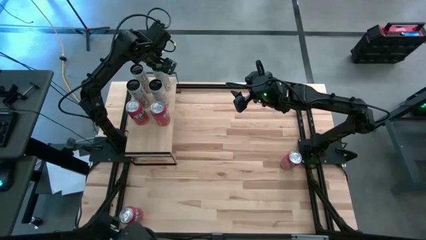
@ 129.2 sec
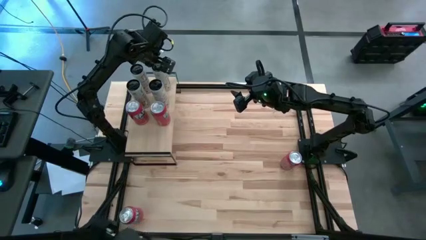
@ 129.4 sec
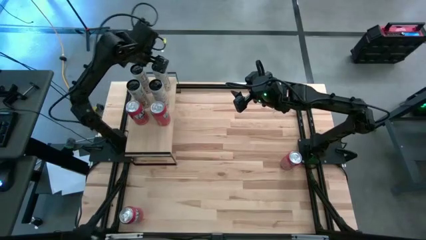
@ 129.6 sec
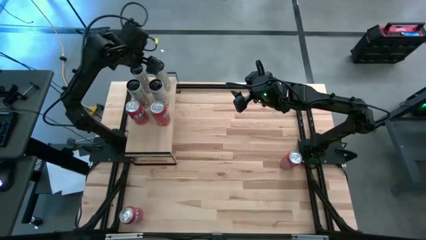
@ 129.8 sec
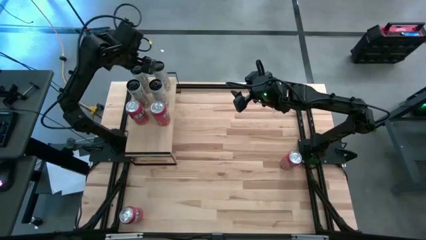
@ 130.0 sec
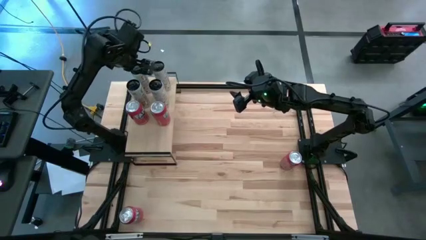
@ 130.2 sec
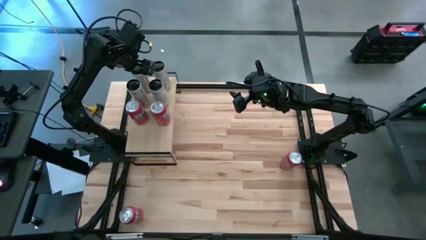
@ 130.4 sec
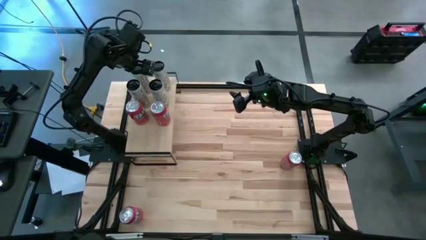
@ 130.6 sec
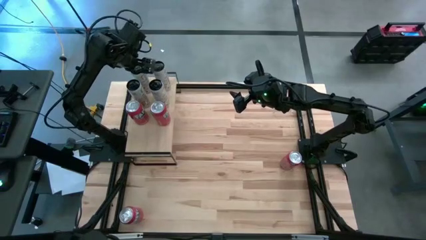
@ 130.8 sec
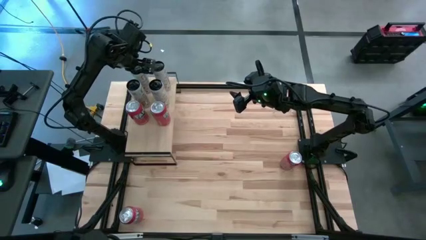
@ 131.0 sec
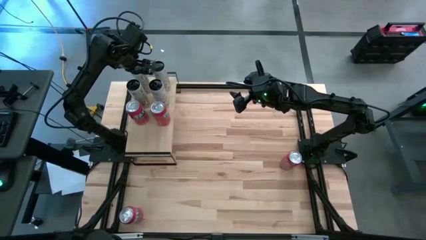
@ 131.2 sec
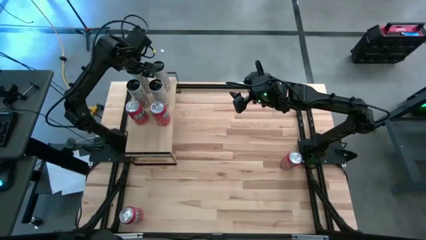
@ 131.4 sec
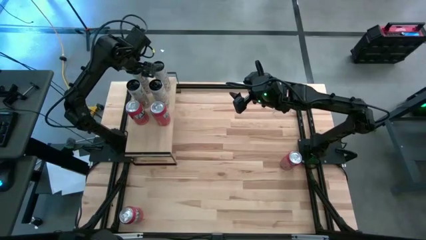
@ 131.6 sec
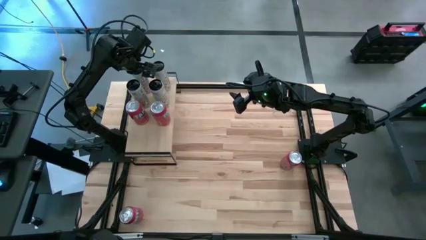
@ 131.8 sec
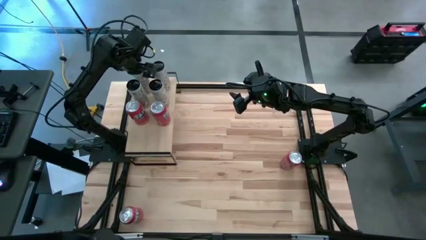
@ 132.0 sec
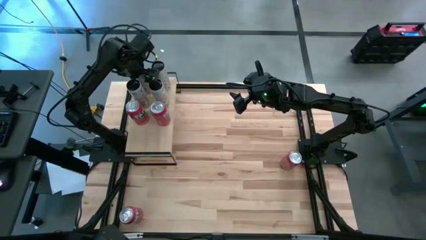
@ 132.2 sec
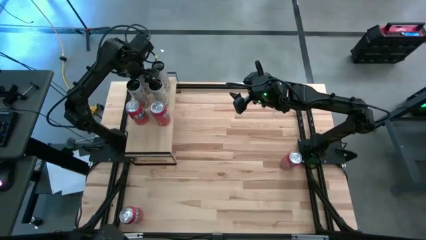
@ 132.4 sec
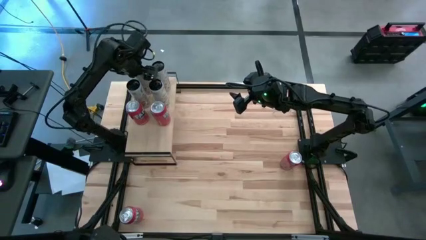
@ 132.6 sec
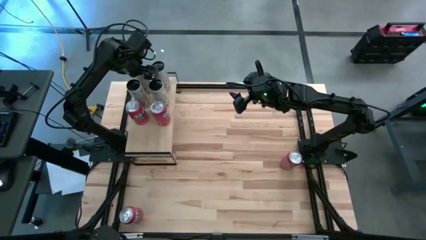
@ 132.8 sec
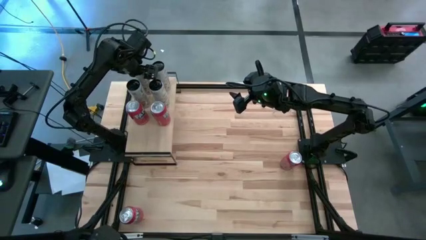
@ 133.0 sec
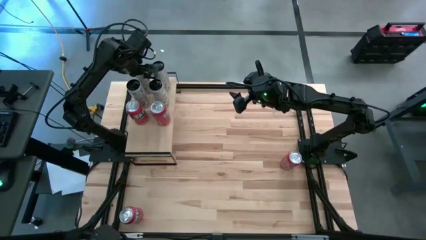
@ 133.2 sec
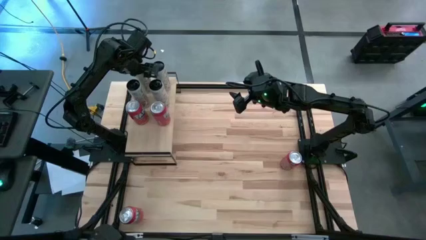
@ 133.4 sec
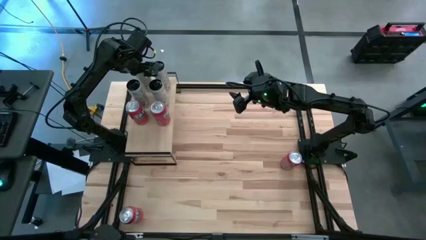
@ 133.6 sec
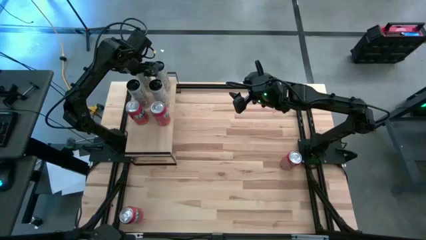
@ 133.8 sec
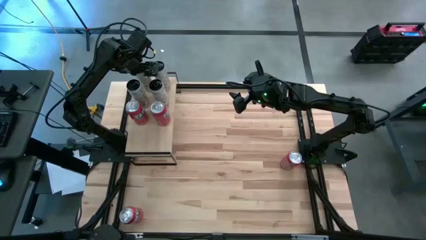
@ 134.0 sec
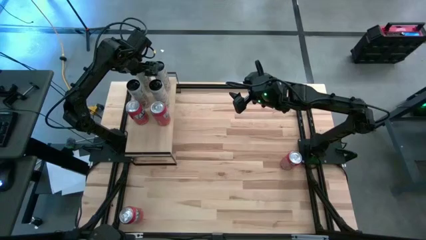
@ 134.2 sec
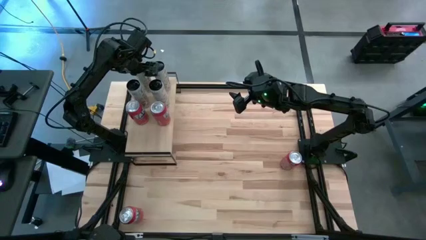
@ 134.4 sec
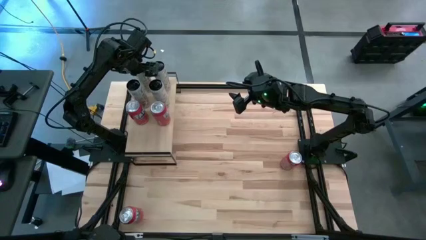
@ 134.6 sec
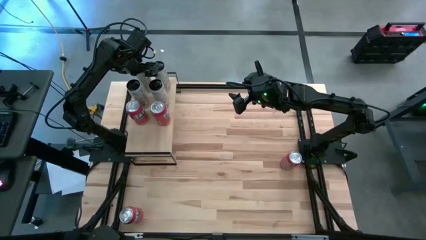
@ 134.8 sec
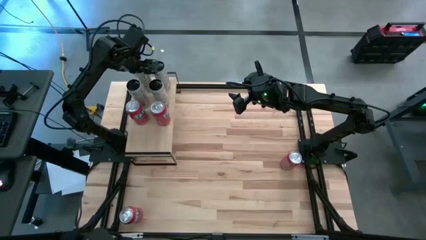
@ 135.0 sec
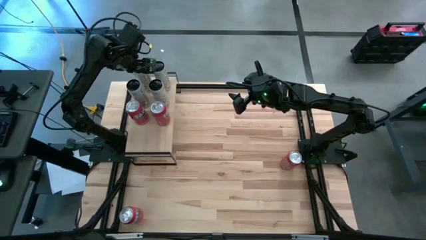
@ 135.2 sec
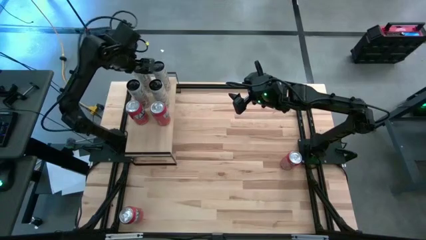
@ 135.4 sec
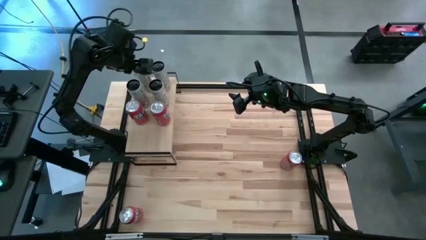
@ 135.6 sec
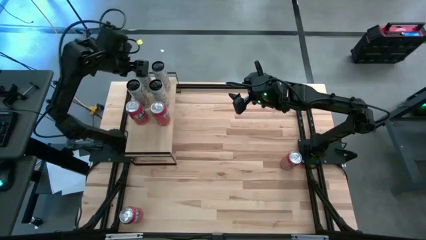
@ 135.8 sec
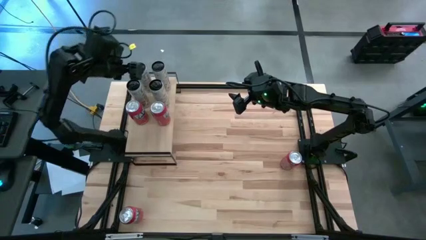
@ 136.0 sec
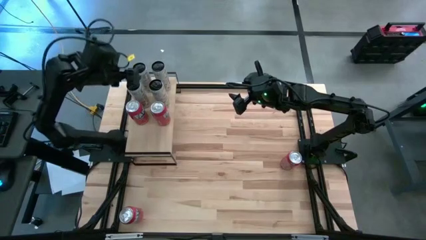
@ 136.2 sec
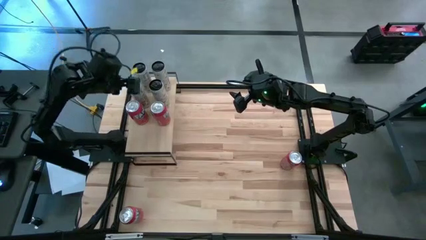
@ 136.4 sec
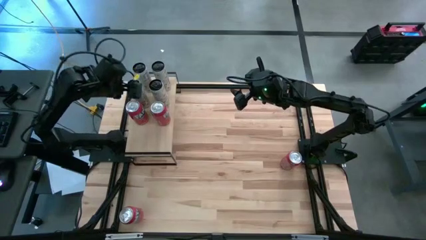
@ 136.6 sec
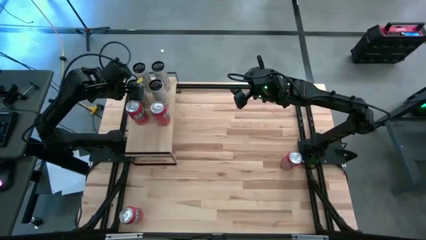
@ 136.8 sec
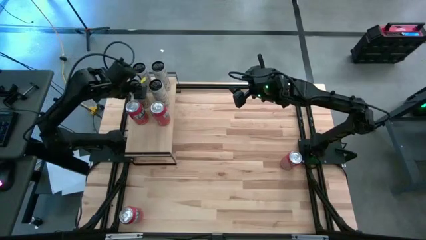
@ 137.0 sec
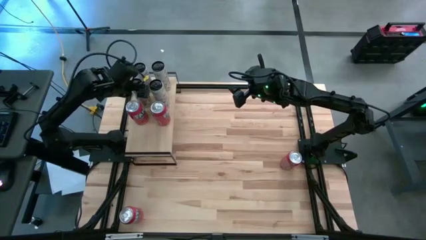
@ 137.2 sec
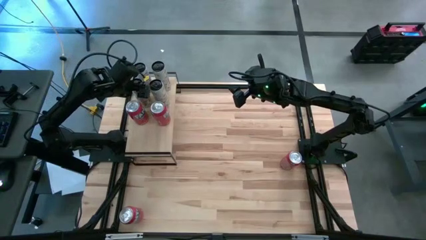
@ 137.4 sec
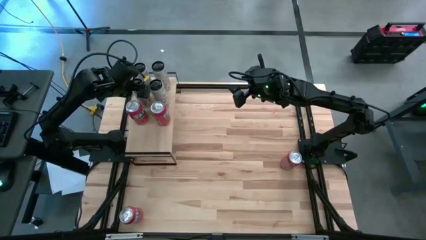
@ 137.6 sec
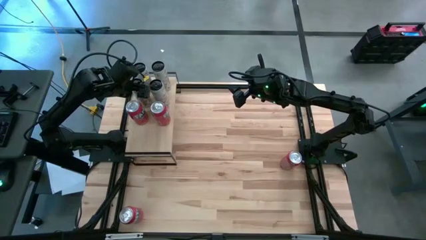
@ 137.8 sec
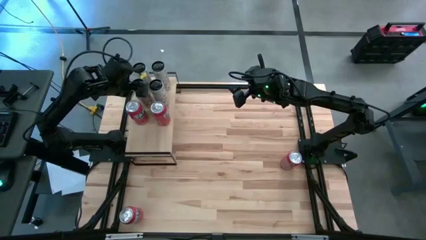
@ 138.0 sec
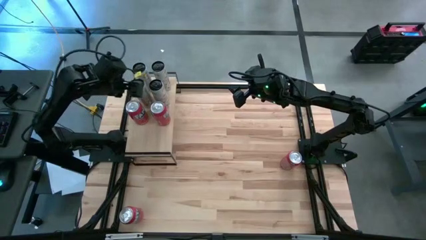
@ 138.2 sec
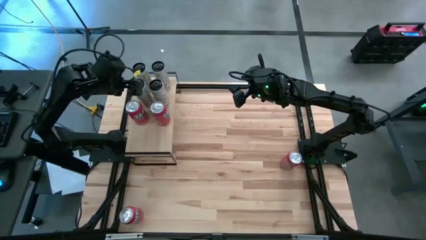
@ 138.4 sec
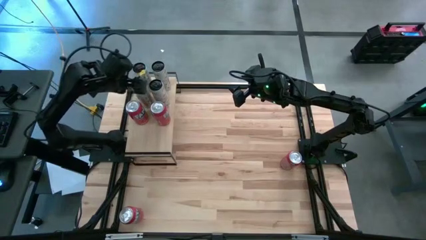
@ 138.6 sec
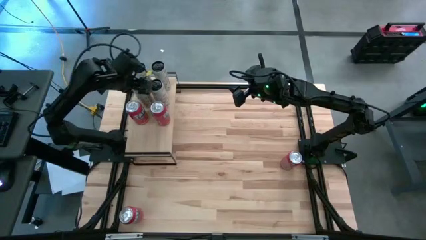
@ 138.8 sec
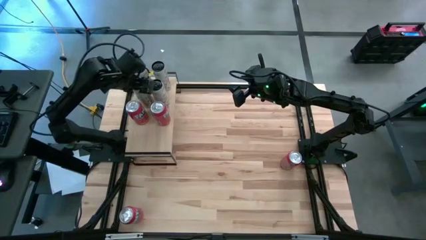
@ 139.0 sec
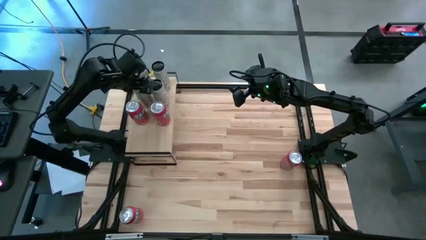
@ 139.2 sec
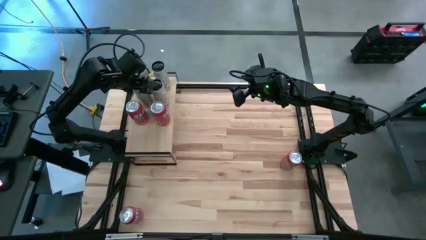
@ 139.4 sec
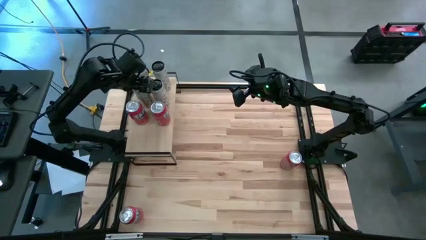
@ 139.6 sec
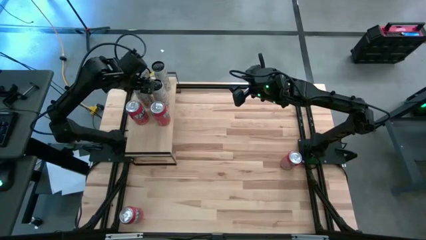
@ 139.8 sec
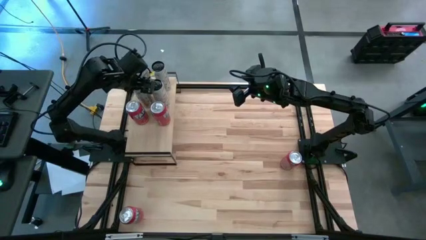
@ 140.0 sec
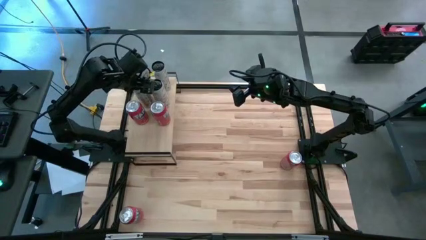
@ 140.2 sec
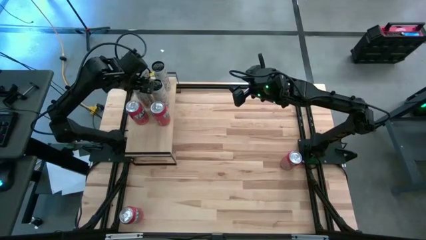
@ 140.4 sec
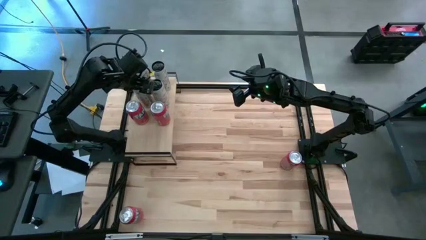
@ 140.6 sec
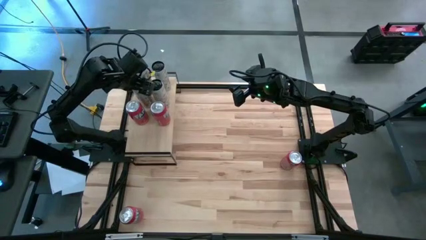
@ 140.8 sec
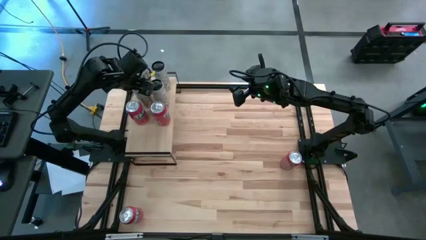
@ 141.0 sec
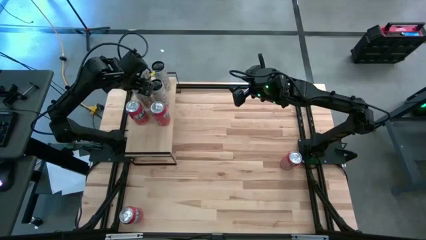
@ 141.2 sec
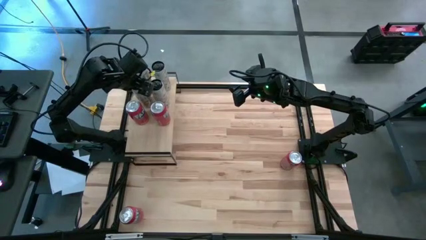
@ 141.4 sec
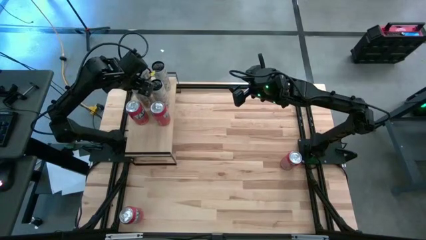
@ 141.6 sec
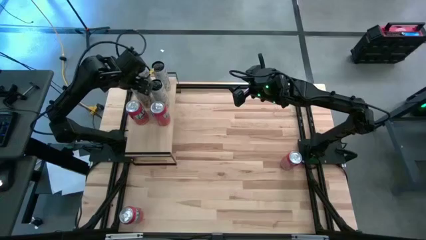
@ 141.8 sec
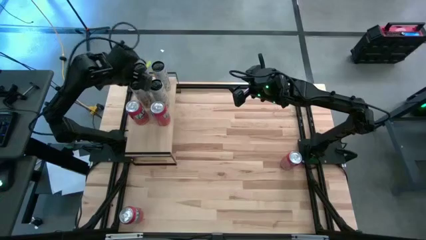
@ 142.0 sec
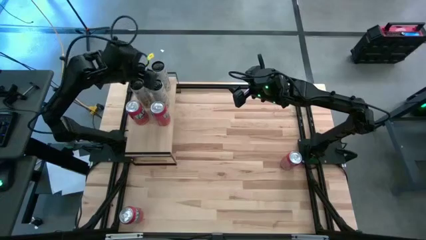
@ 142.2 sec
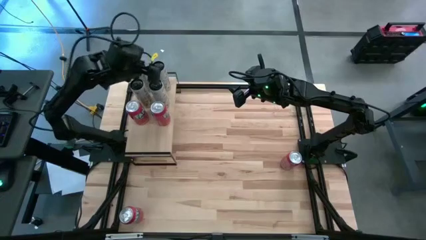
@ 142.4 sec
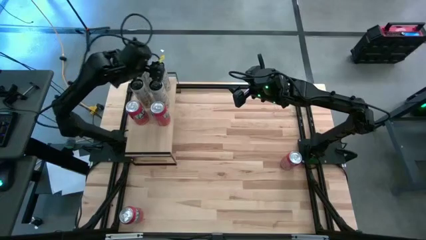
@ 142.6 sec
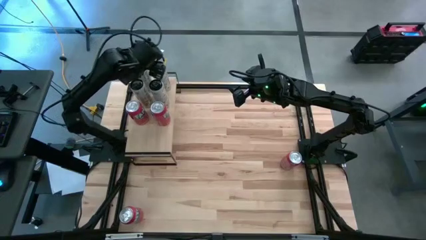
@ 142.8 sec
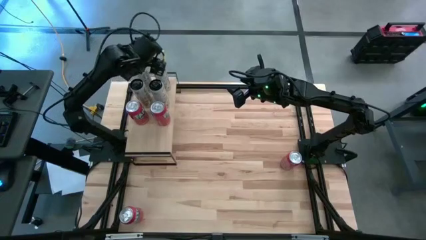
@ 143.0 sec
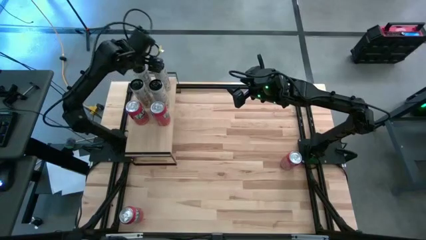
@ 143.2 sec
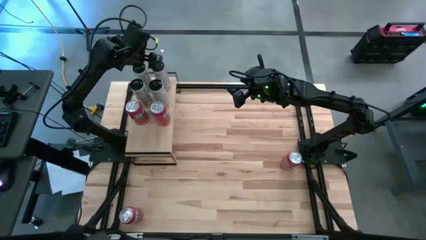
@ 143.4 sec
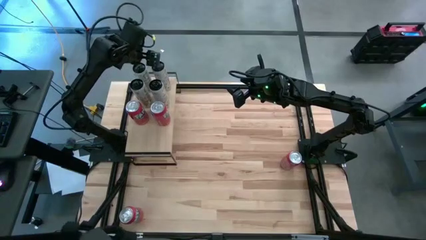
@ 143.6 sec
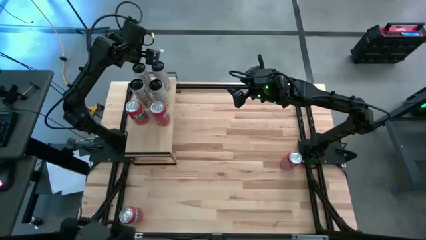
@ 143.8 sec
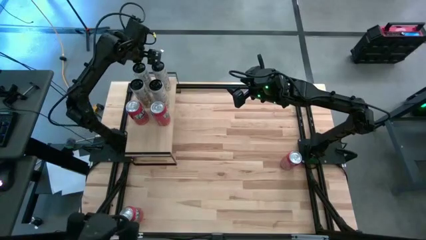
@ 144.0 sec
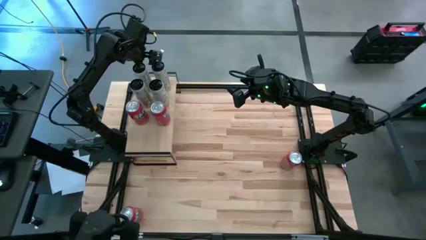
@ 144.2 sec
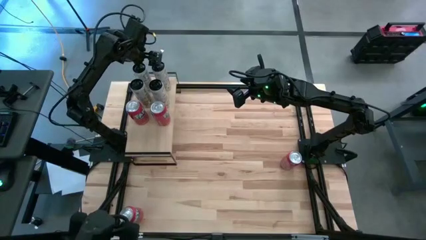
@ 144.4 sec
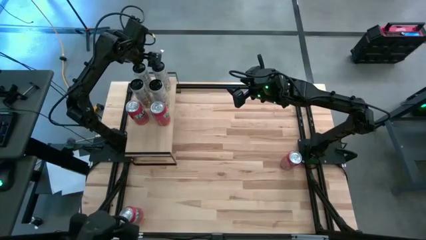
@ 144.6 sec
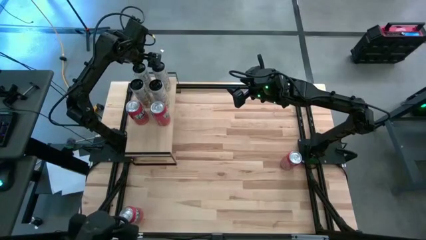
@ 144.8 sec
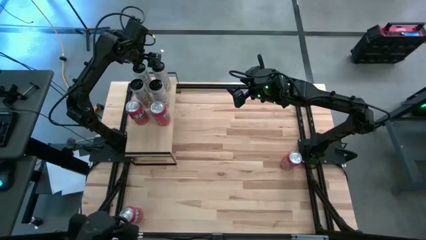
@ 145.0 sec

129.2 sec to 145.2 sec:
Task: Place canned beverage on shelf
Adjust the white yellow soda cans
